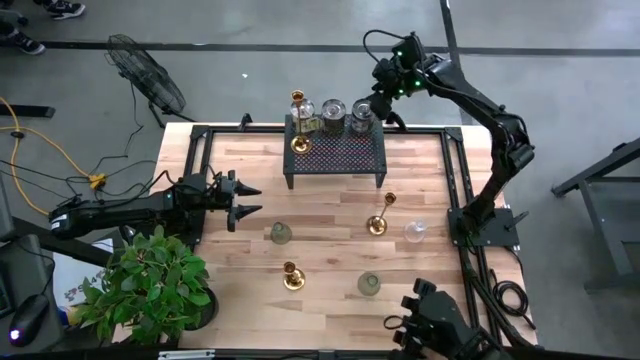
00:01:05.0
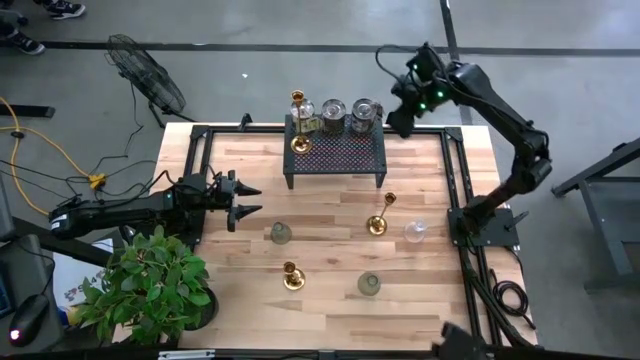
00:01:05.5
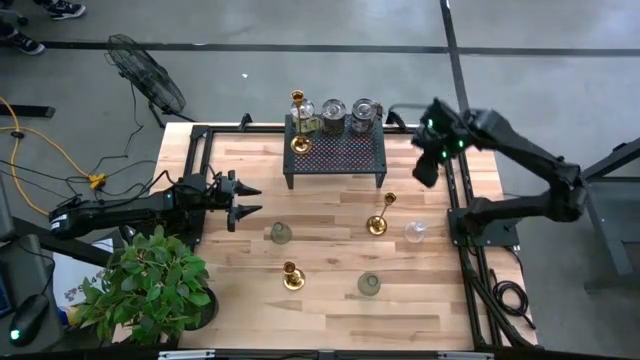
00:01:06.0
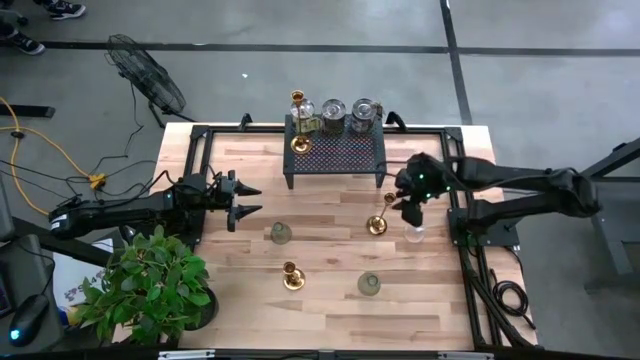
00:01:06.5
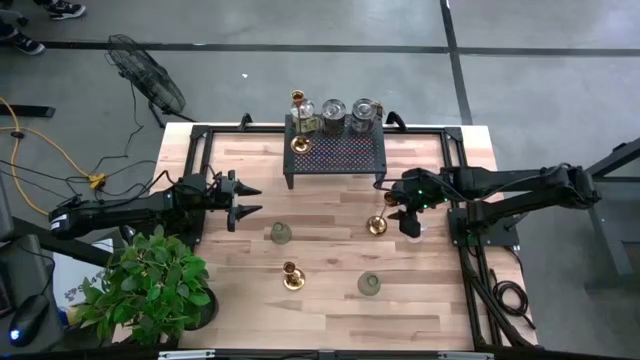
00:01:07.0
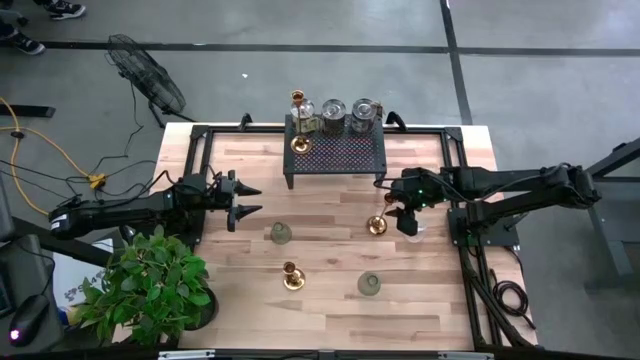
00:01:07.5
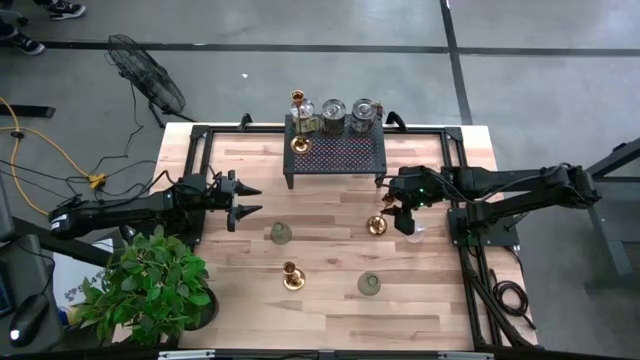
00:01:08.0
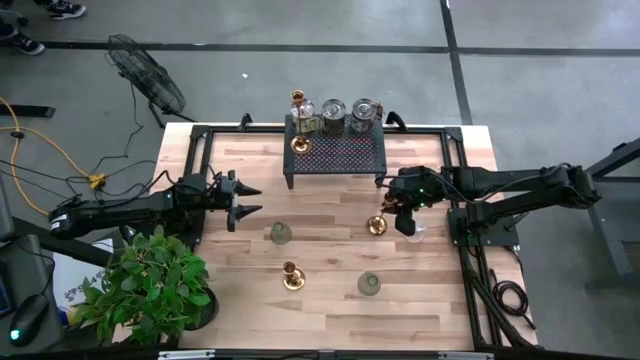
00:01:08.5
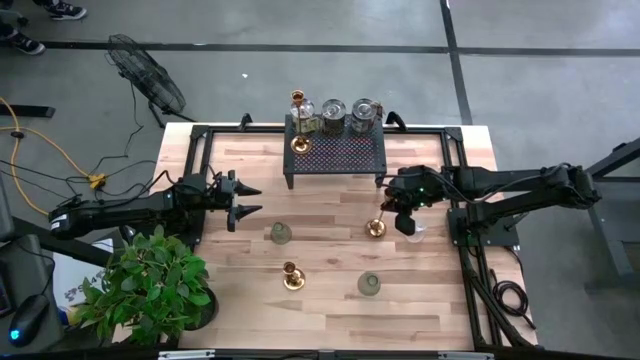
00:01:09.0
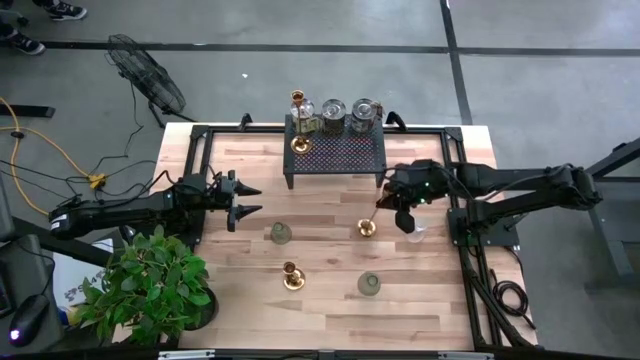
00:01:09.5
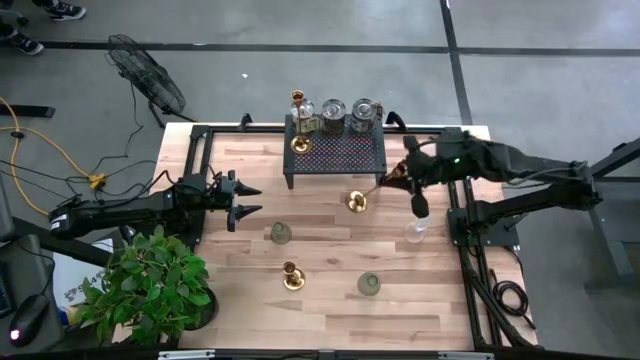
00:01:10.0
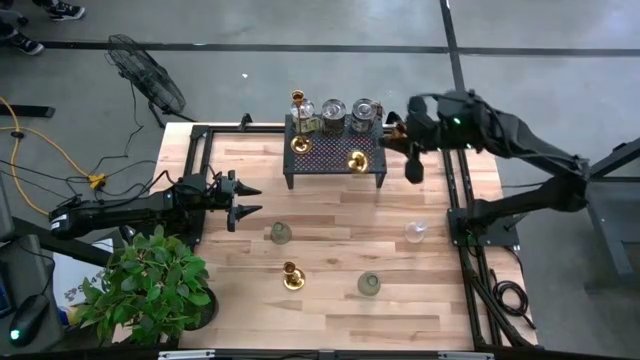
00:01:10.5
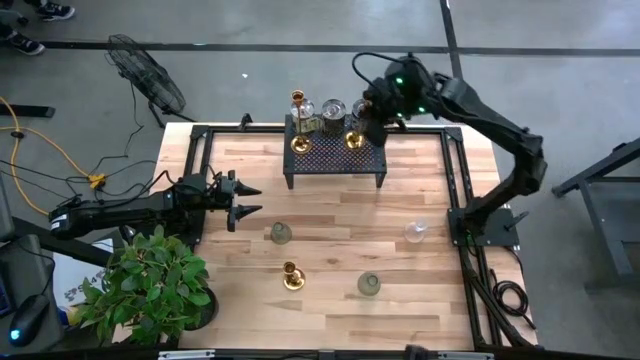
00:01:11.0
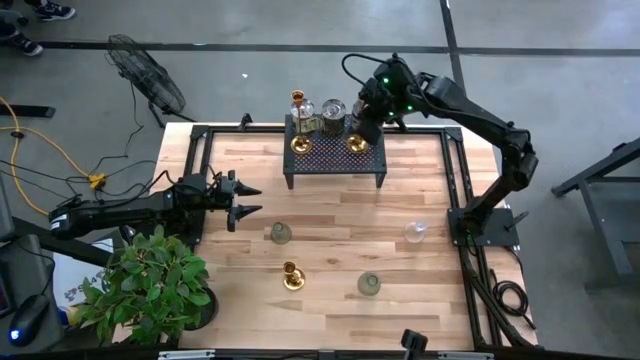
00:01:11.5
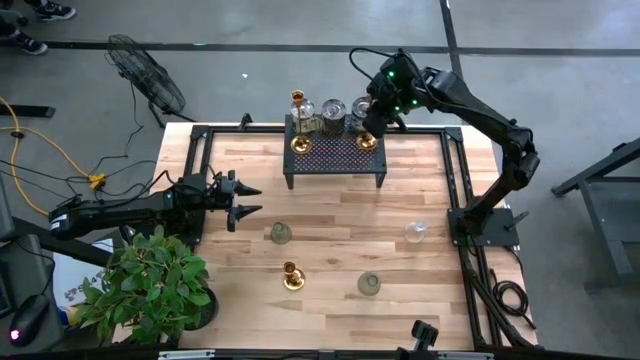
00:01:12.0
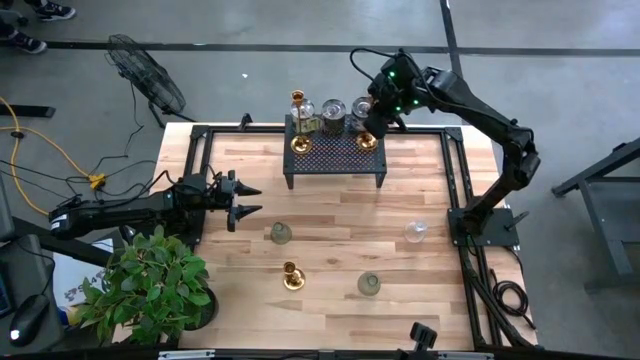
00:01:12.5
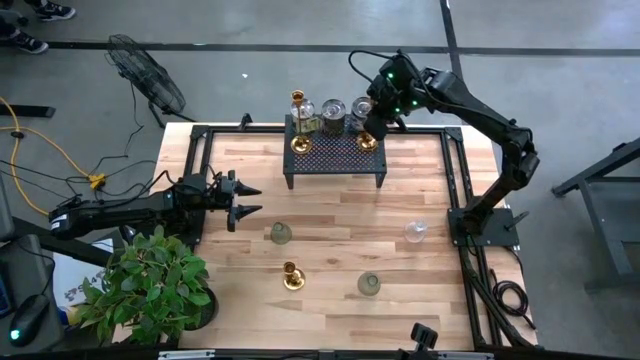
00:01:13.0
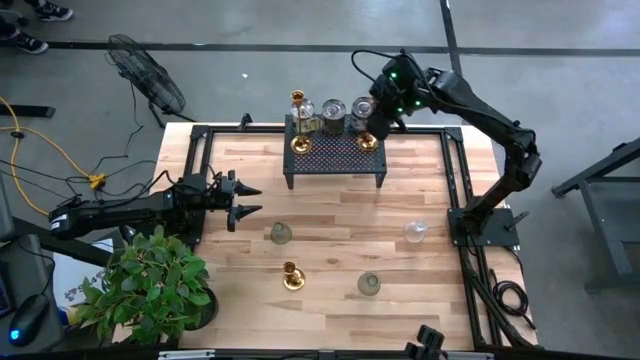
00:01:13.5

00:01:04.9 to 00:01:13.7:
Task: Stock candles on shelf
Put the top gold candle holder on the shelf

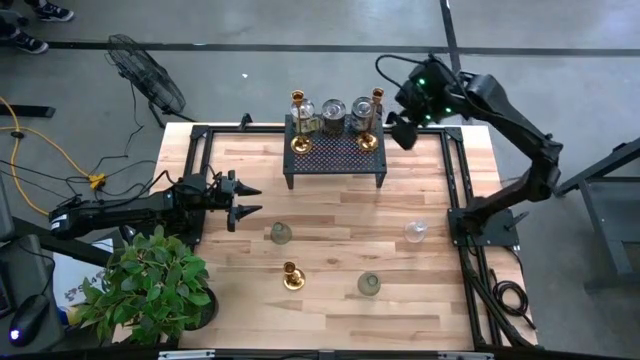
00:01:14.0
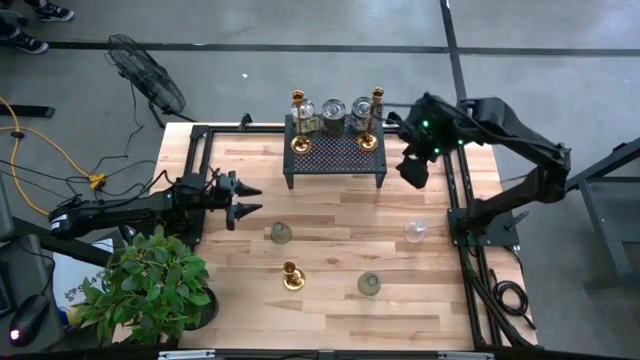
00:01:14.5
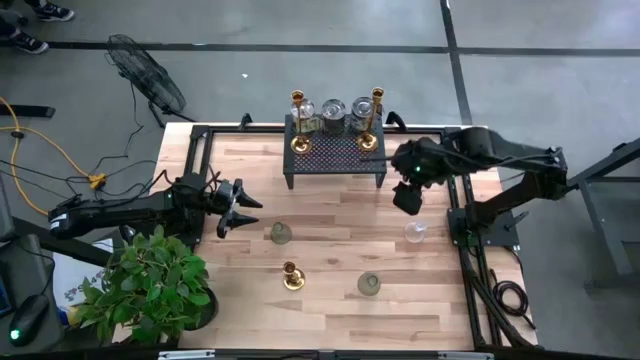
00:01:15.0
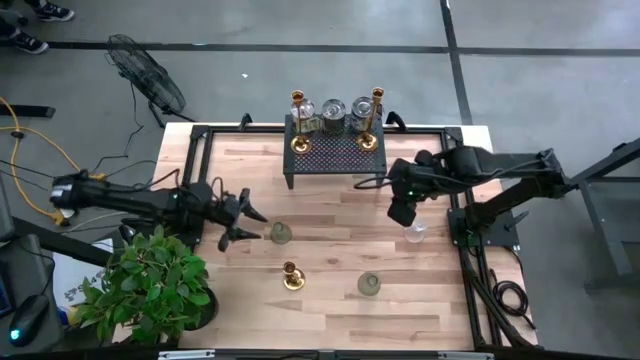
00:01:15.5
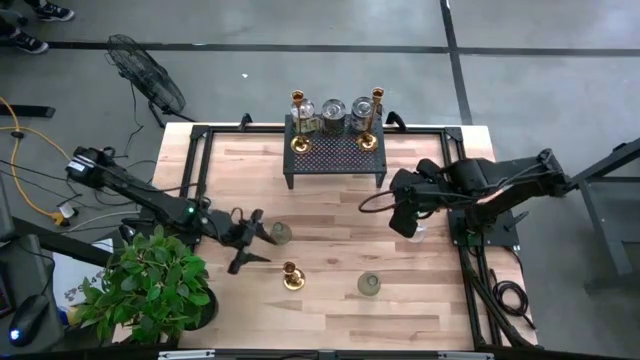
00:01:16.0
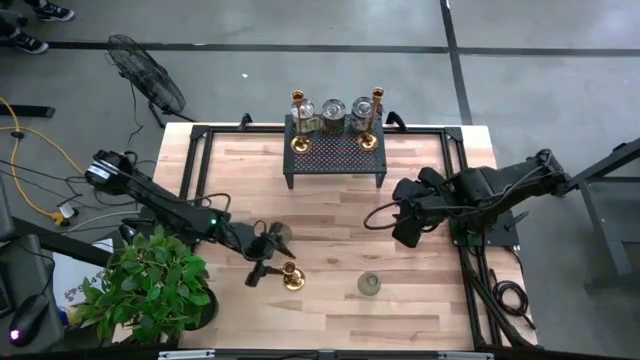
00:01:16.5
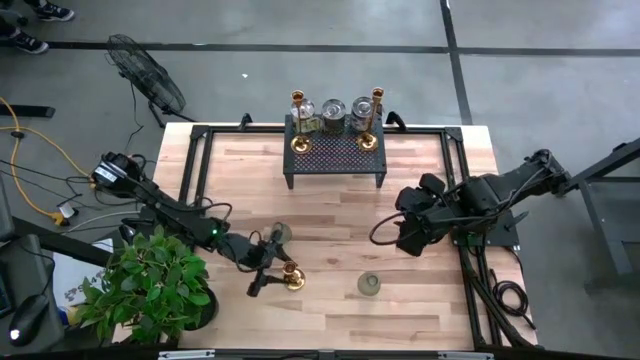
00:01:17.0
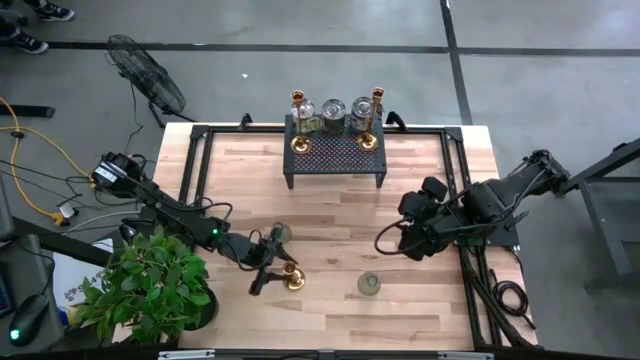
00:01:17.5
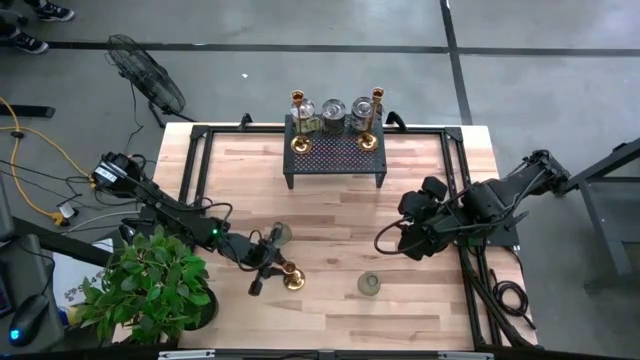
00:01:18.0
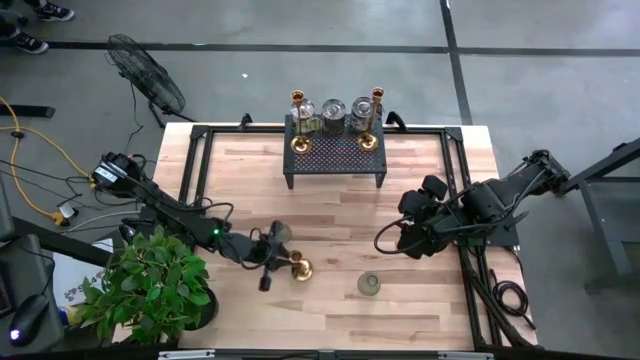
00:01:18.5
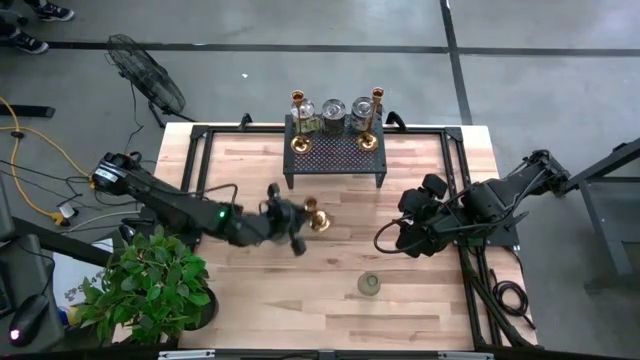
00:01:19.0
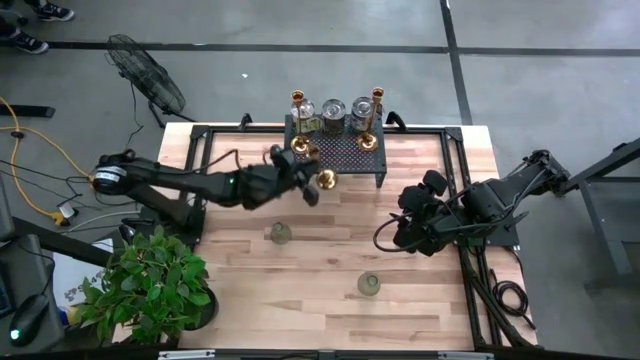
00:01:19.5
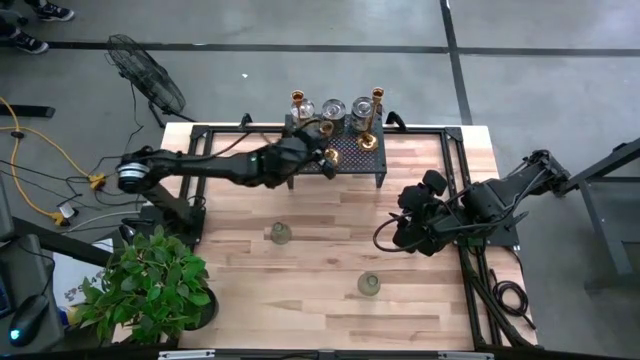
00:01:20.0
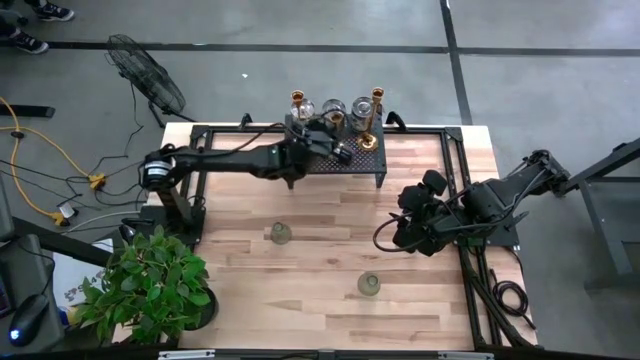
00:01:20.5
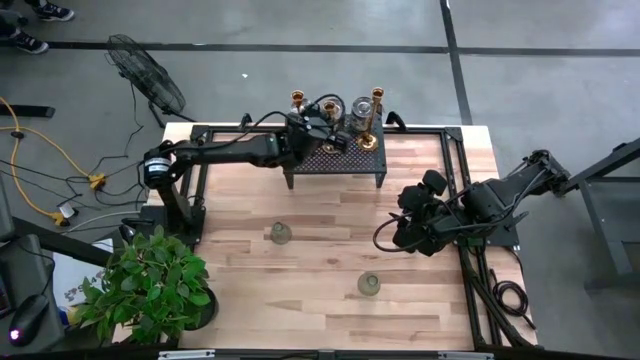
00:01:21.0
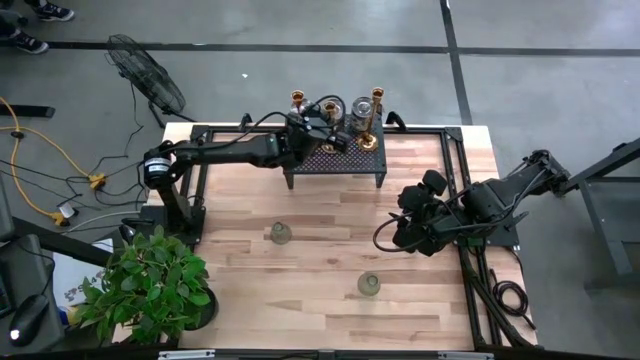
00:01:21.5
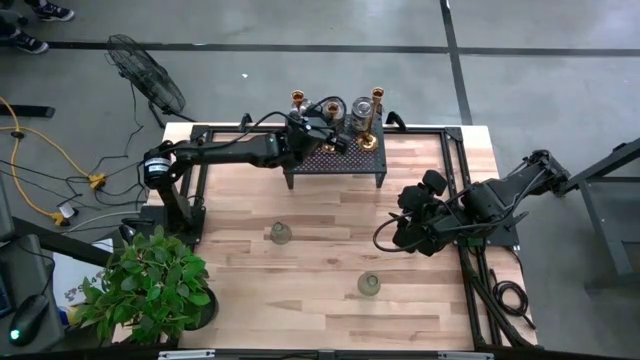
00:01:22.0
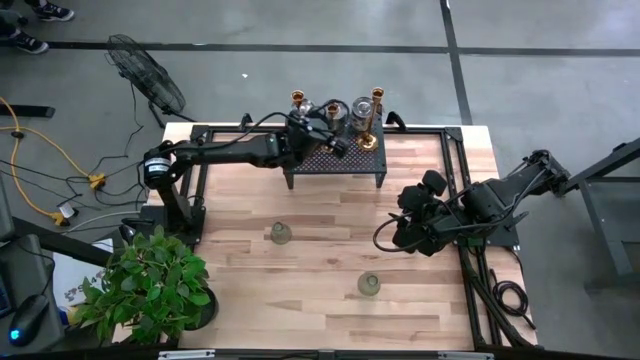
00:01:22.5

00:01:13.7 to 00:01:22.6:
Put the gold candle holder on the shelf

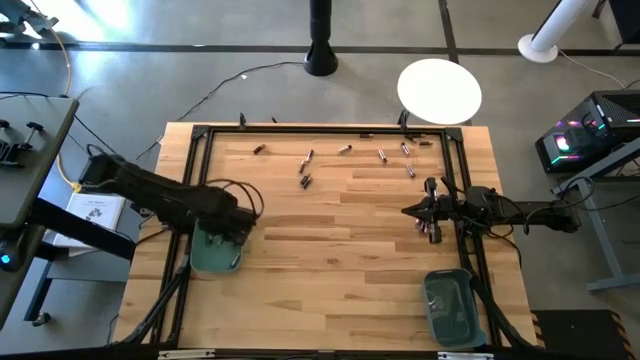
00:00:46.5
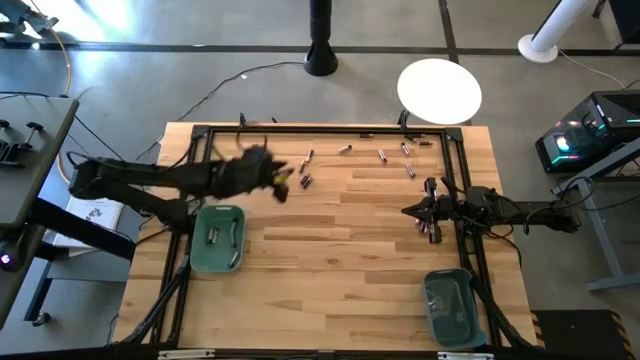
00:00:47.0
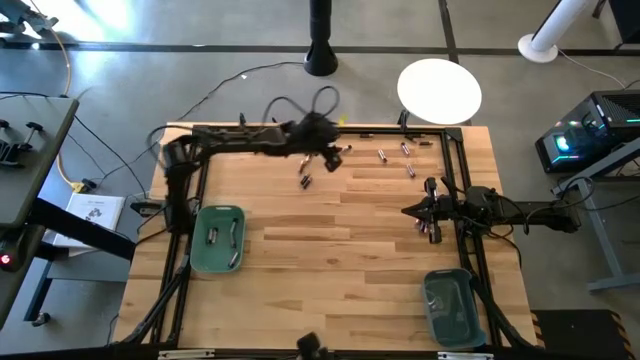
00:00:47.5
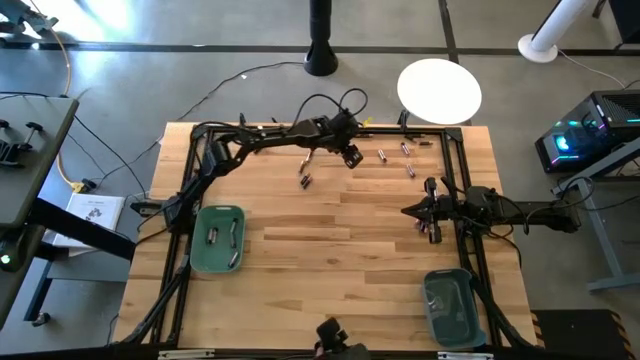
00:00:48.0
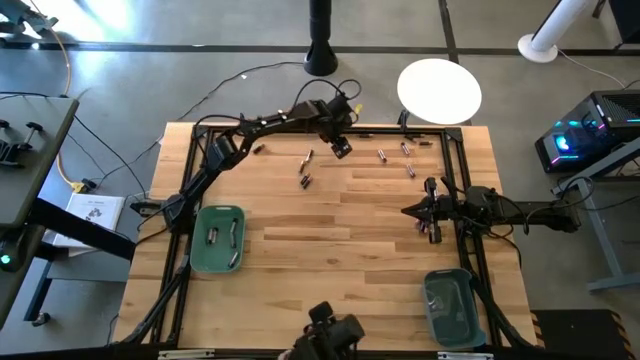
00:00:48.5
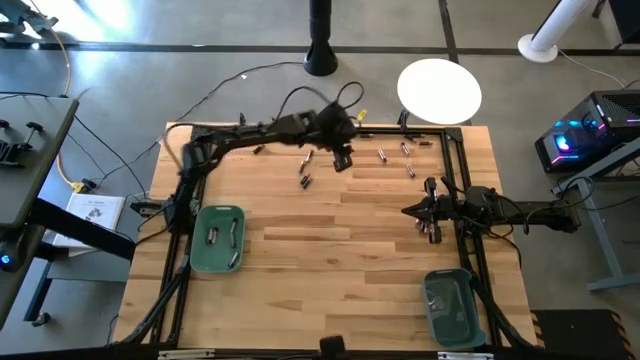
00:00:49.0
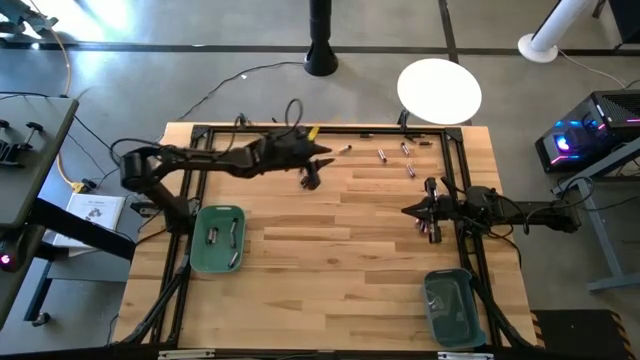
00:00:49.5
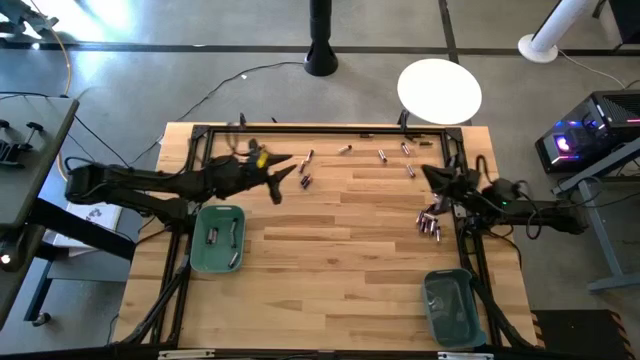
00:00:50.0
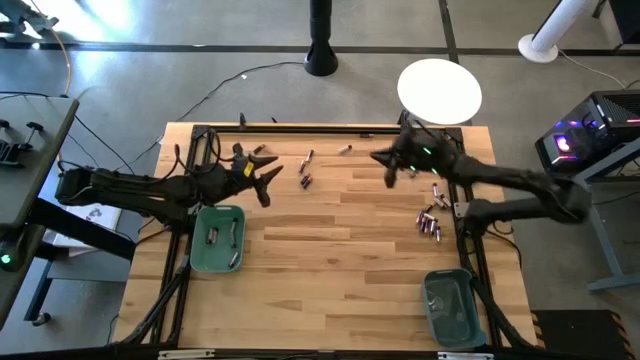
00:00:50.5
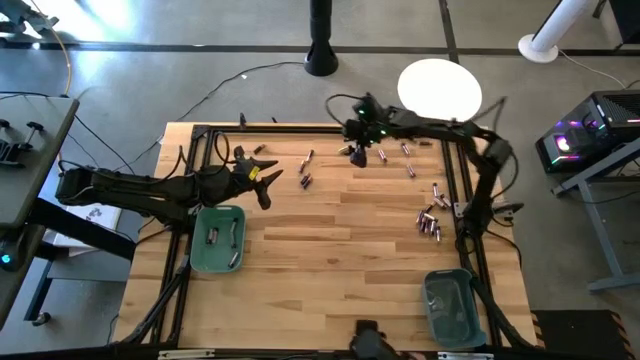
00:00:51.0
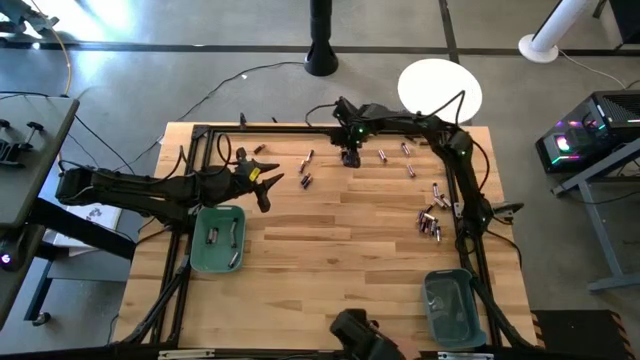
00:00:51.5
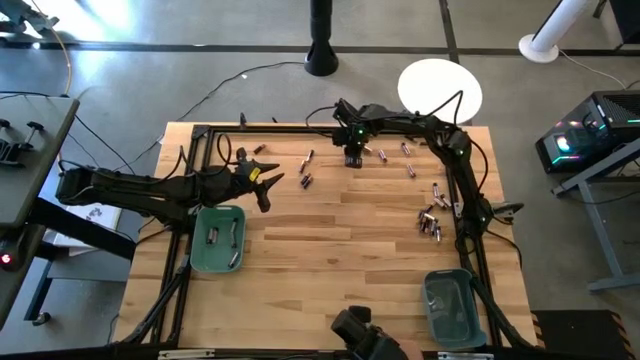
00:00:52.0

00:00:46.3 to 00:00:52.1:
Task: Sort batteries
Put the silver battery into the green bin
